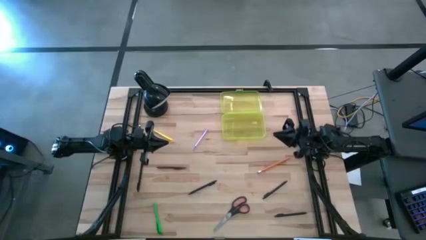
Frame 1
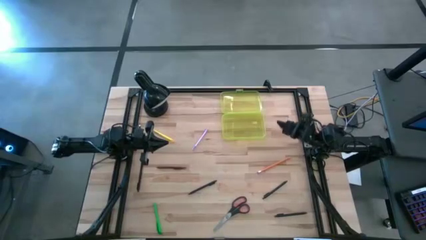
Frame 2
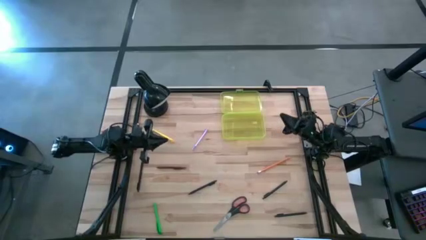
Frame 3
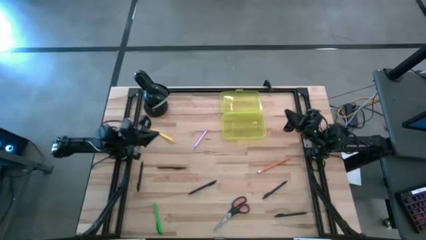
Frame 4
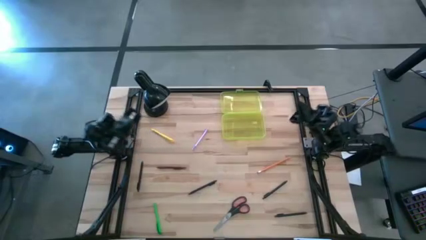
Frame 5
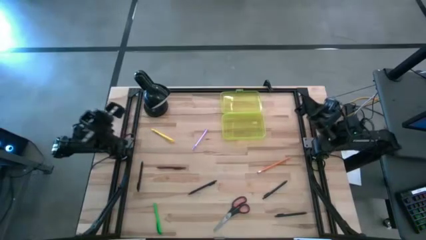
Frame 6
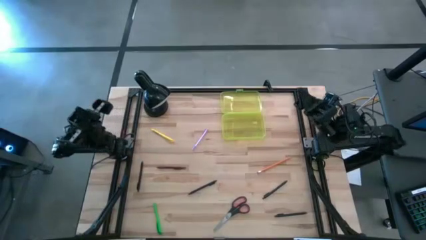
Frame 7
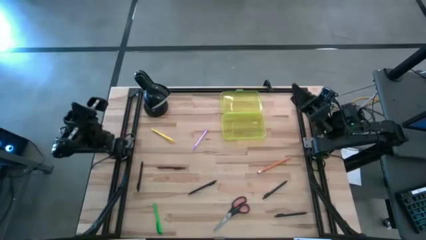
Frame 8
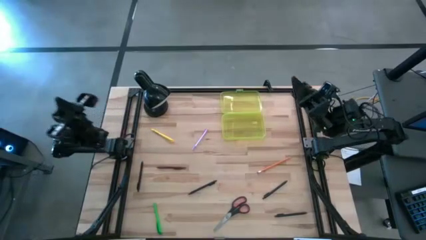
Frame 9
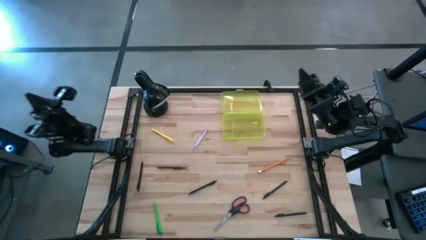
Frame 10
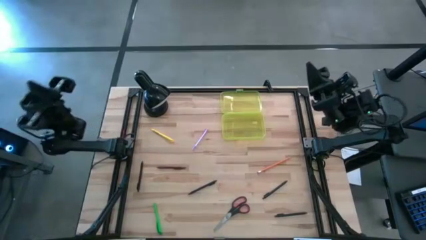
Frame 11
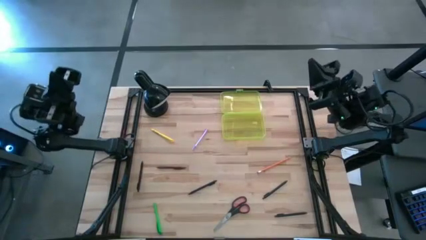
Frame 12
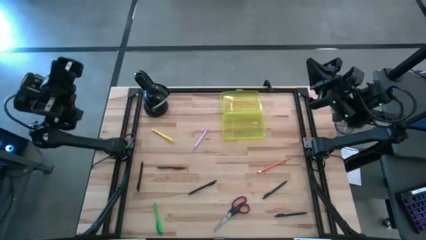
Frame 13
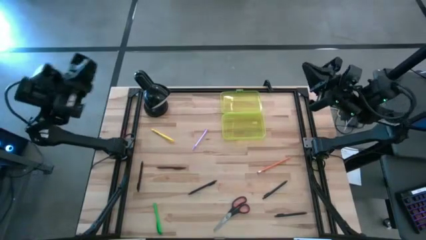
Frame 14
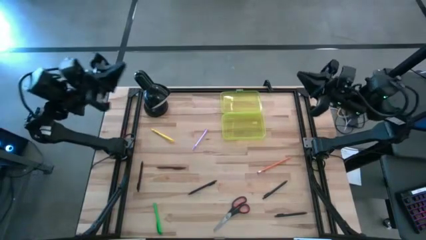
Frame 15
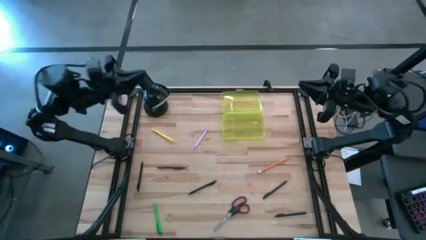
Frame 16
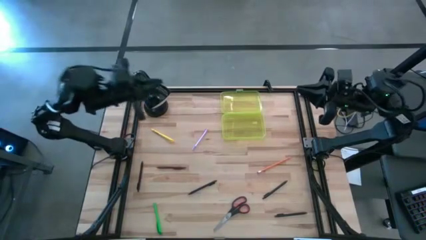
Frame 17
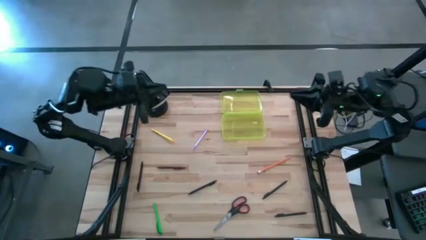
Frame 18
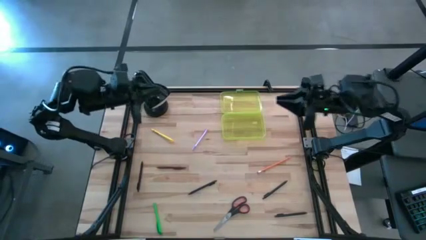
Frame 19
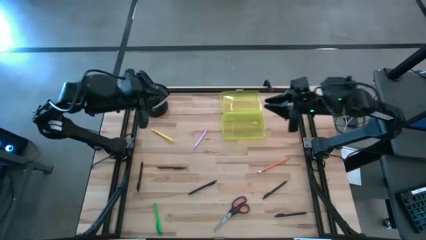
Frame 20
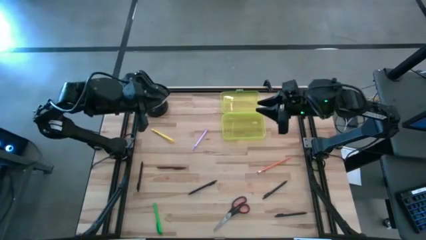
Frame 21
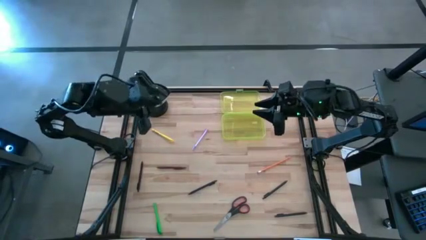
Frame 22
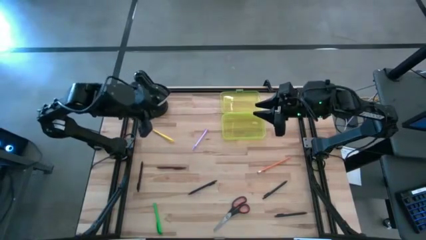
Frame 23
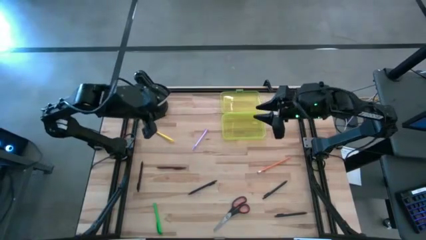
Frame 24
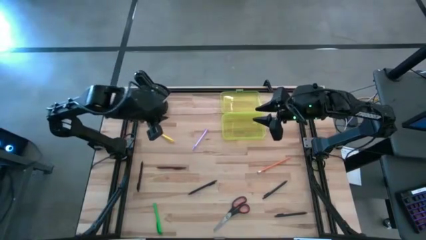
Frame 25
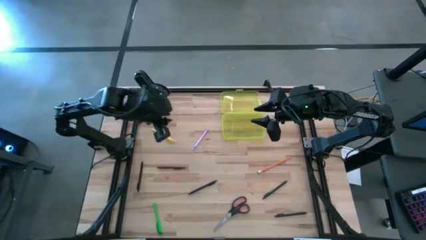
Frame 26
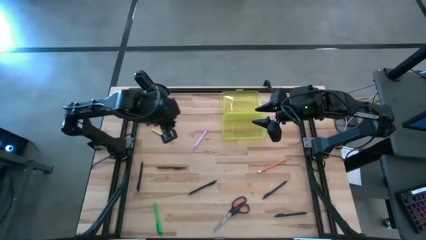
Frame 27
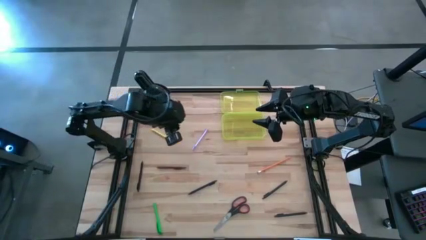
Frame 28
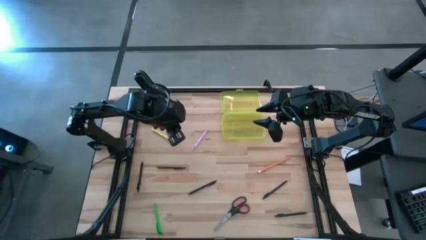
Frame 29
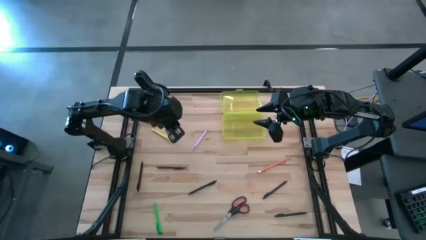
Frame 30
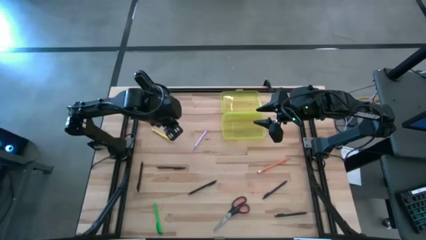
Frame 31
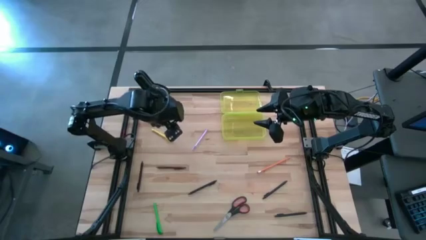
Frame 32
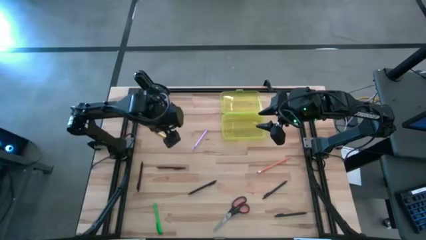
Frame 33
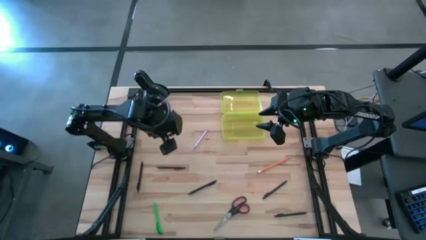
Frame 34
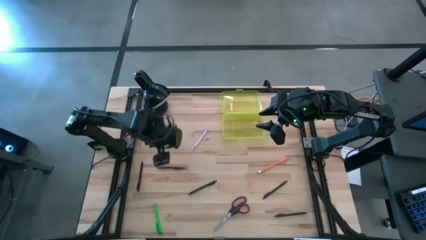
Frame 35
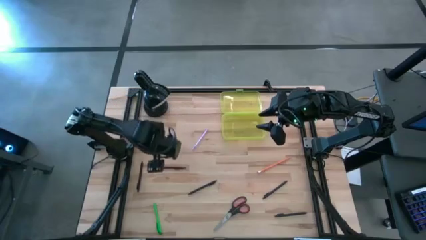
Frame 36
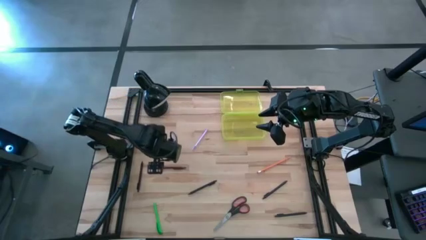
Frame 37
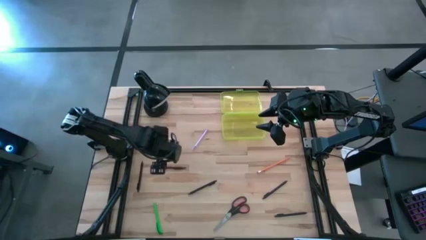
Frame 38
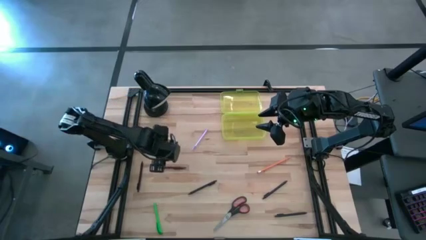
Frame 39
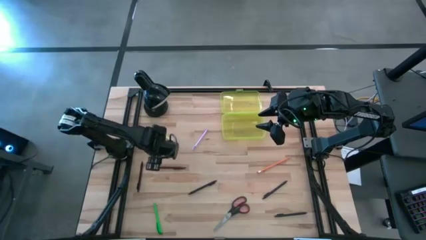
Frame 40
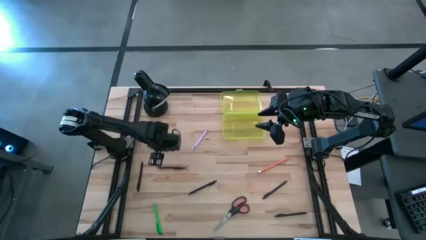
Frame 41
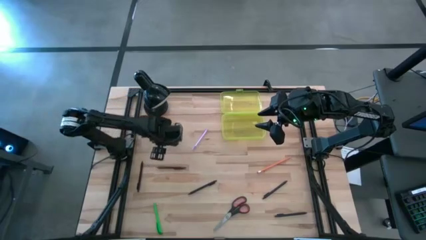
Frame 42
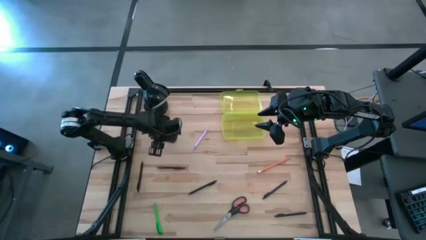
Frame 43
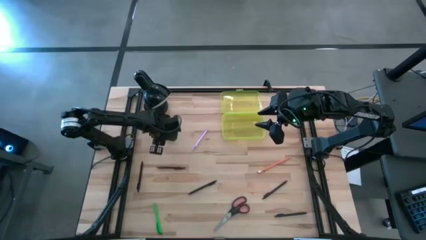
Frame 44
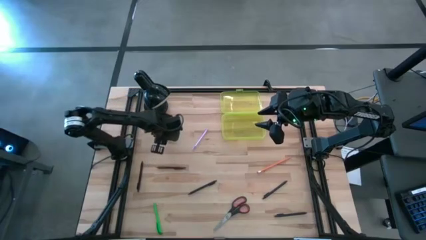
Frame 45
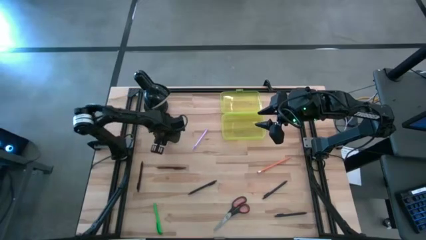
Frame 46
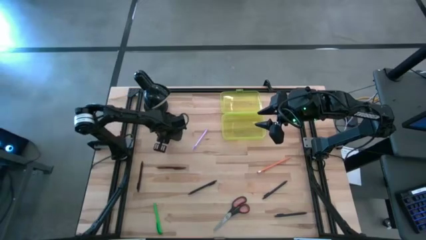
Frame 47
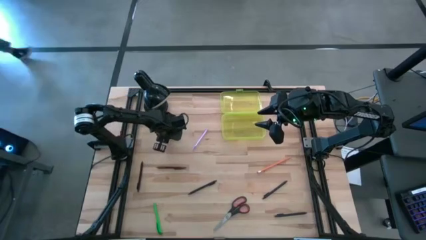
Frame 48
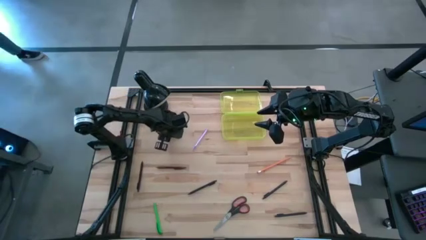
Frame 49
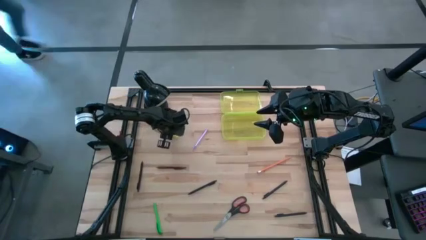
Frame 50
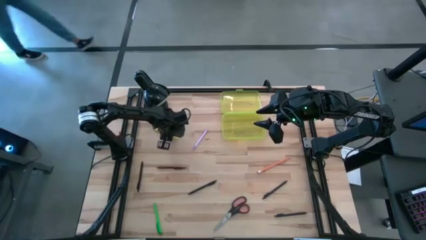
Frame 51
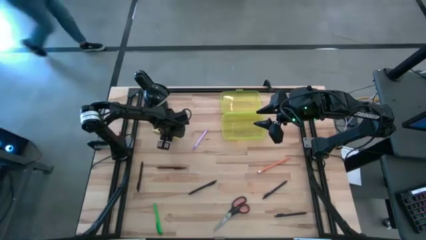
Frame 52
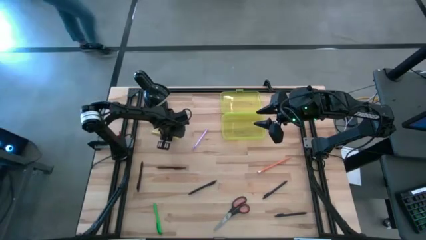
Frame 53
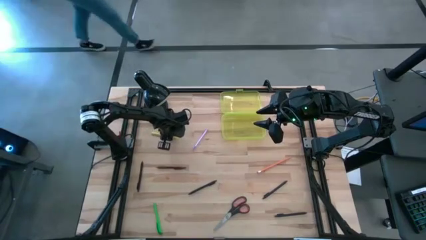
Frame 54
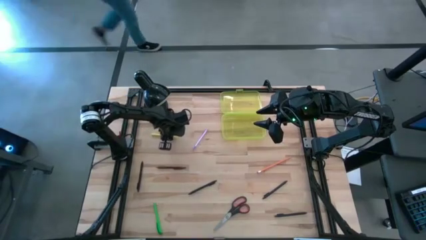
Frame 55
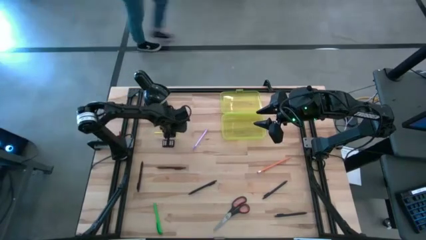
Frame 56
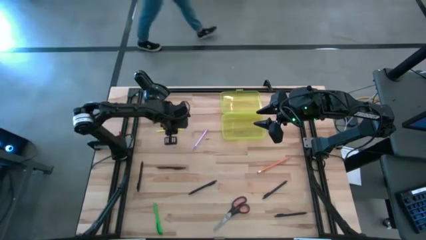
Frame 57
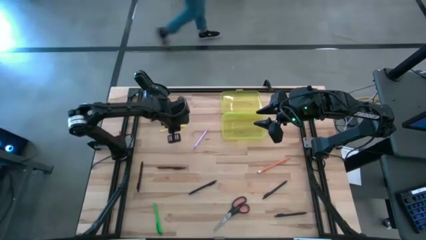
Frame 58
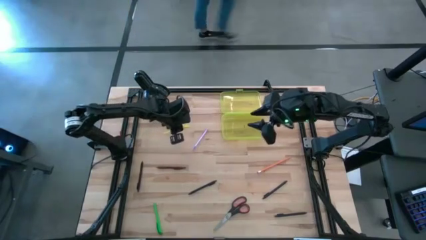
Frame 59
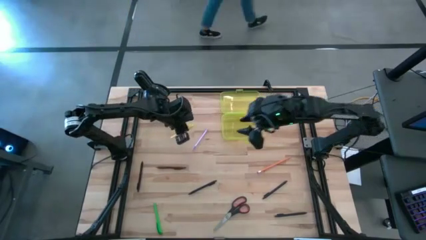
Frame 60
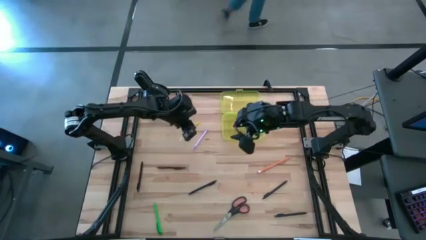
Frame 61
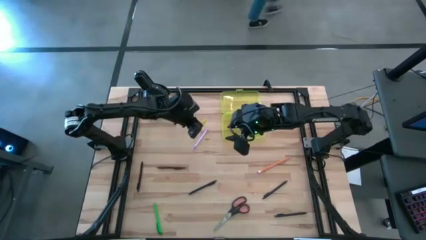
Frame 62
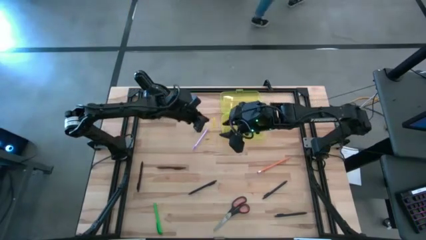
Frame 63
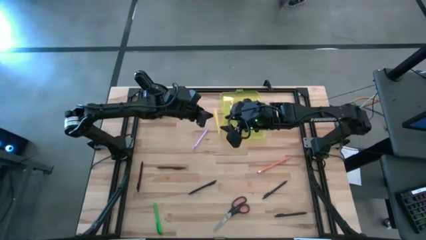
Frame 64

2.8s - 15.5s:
Task: Pick & place school supplies into a supply box
Put the yellow pen into the supply box
